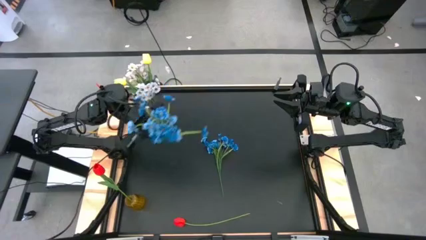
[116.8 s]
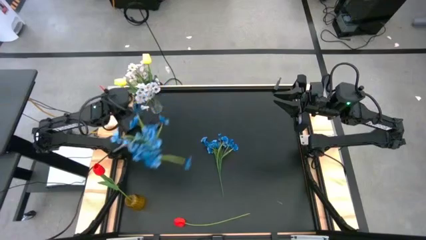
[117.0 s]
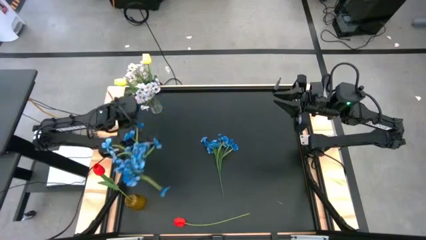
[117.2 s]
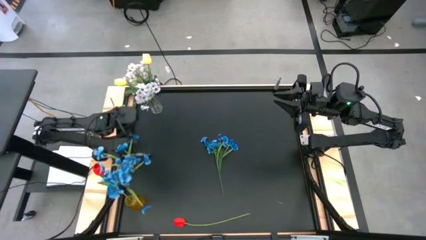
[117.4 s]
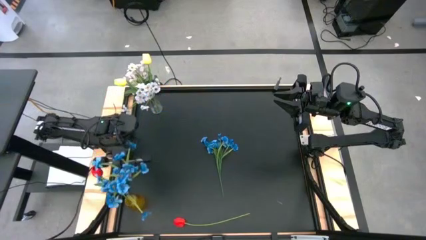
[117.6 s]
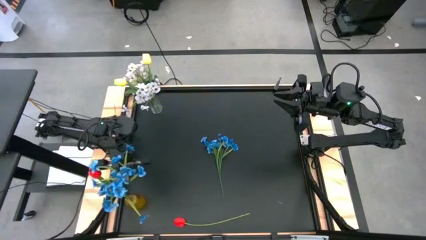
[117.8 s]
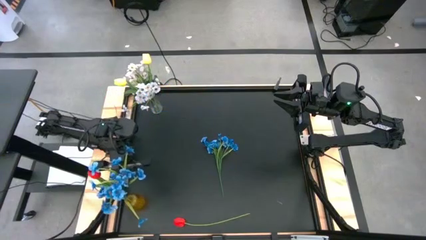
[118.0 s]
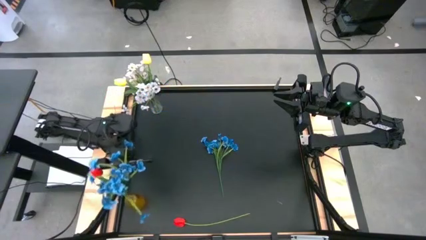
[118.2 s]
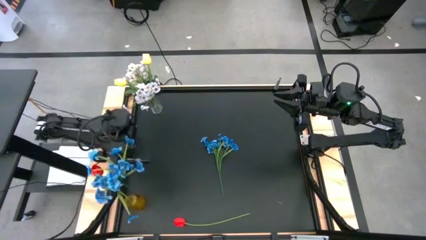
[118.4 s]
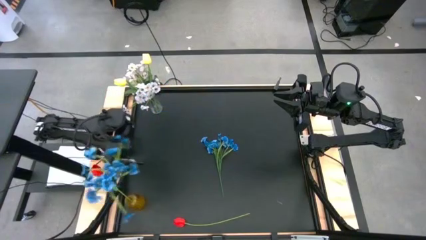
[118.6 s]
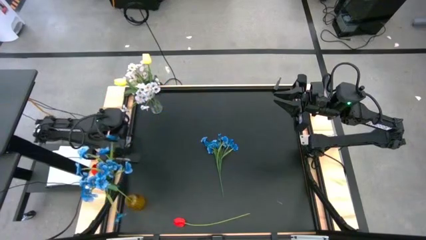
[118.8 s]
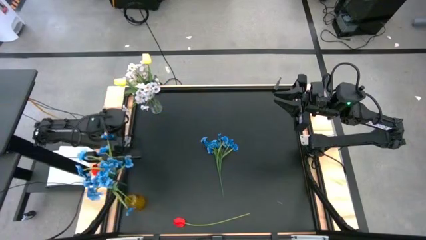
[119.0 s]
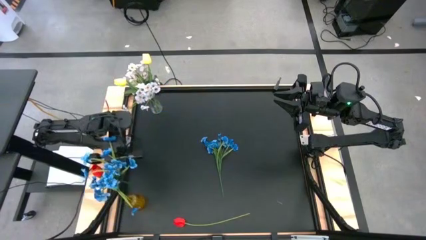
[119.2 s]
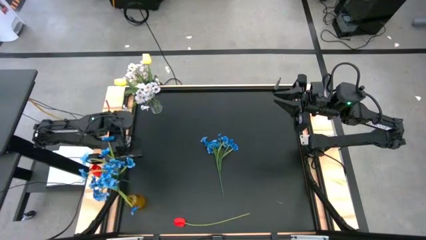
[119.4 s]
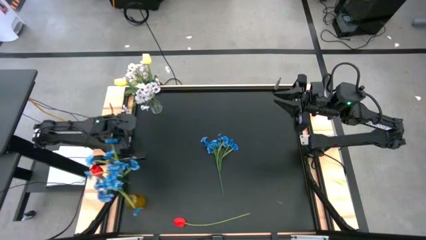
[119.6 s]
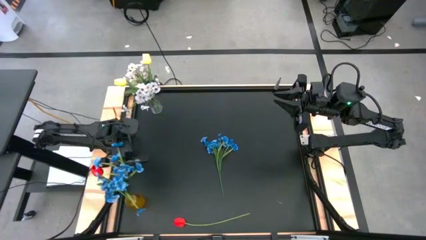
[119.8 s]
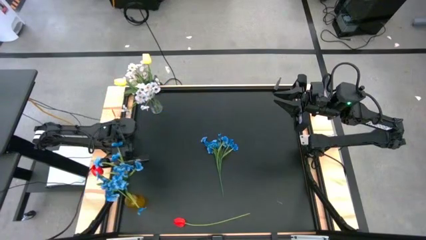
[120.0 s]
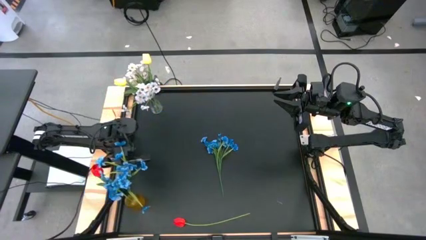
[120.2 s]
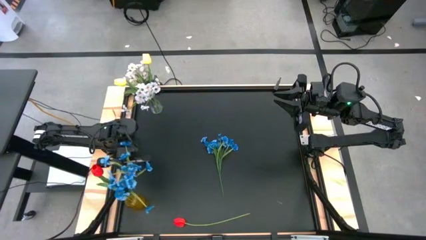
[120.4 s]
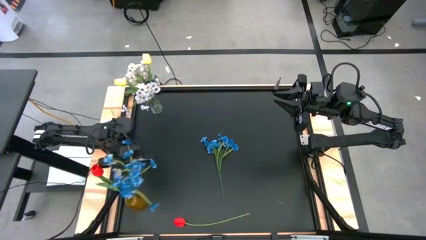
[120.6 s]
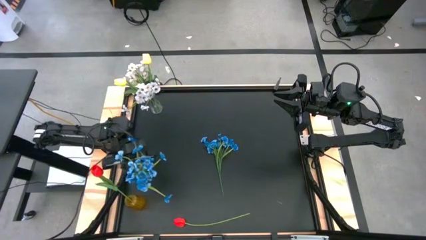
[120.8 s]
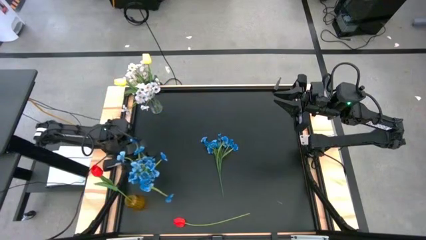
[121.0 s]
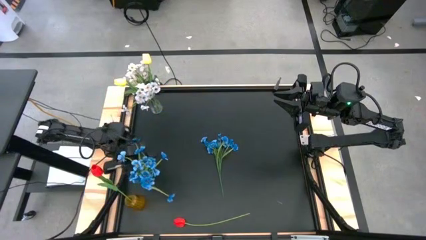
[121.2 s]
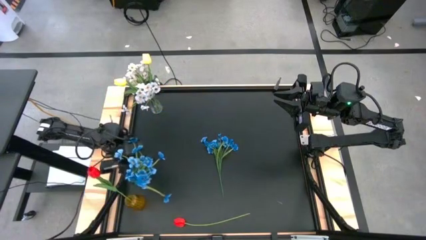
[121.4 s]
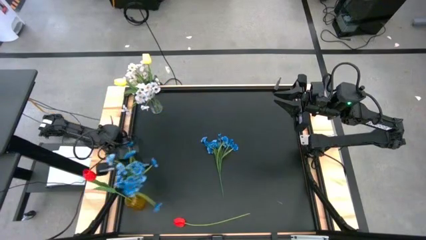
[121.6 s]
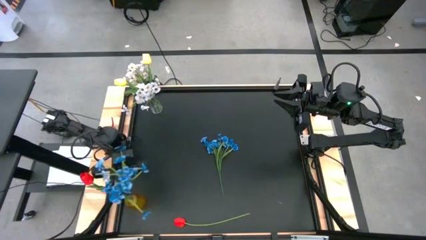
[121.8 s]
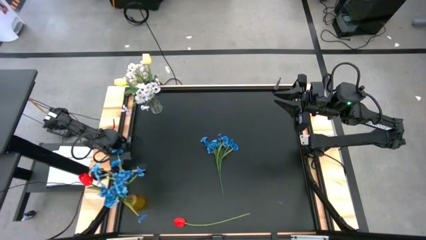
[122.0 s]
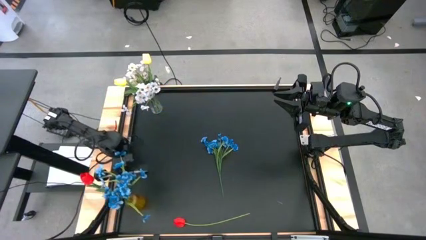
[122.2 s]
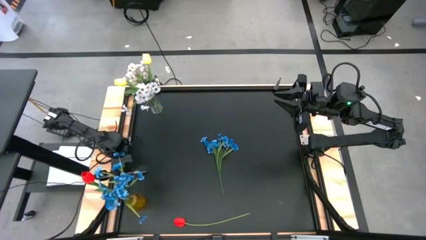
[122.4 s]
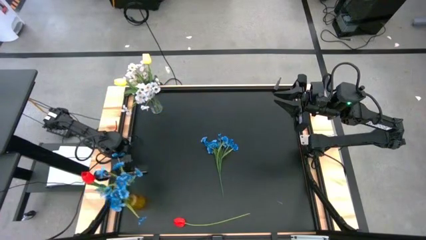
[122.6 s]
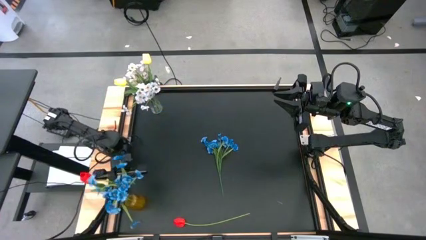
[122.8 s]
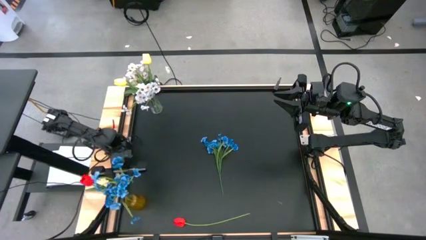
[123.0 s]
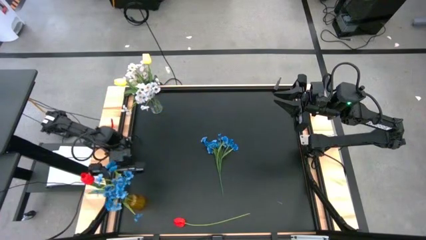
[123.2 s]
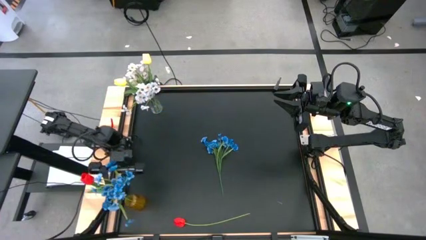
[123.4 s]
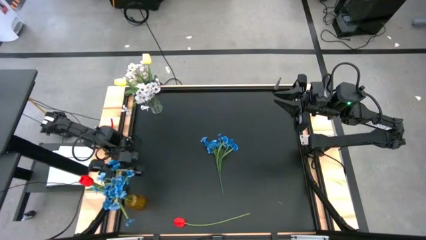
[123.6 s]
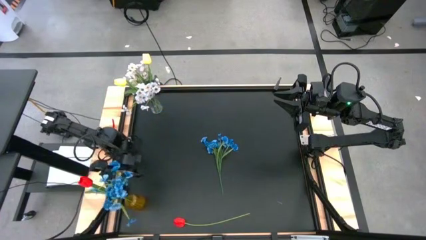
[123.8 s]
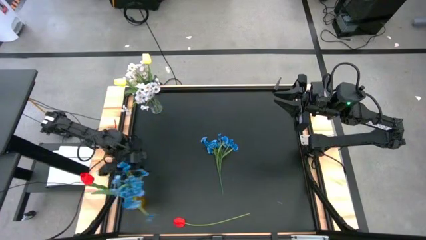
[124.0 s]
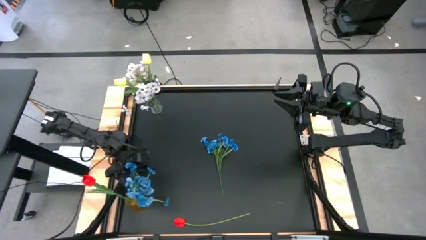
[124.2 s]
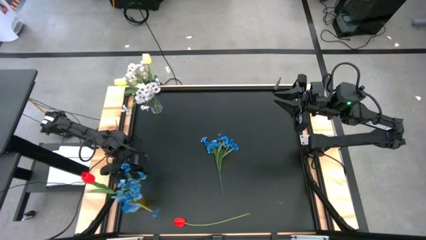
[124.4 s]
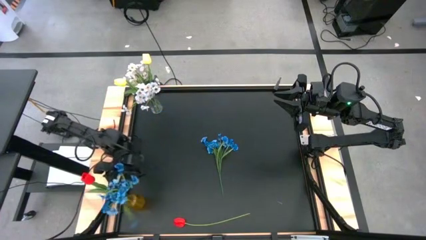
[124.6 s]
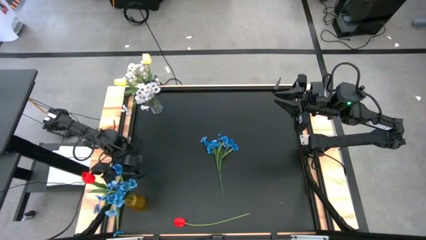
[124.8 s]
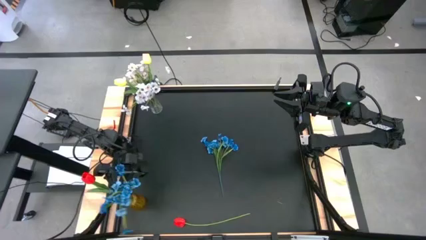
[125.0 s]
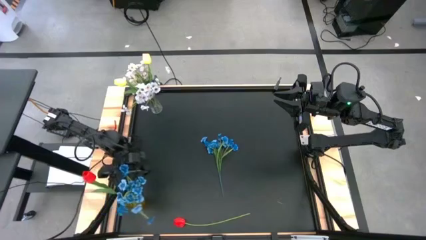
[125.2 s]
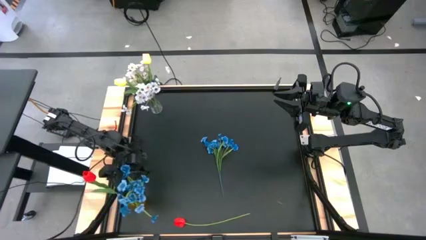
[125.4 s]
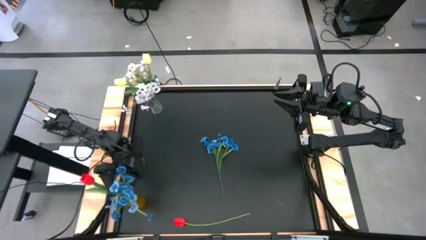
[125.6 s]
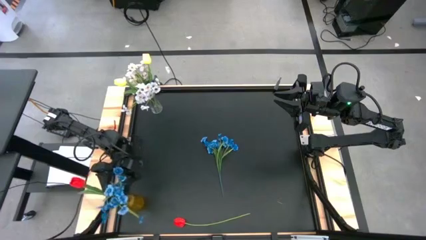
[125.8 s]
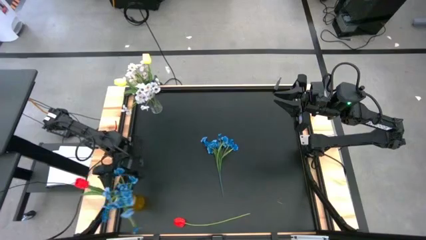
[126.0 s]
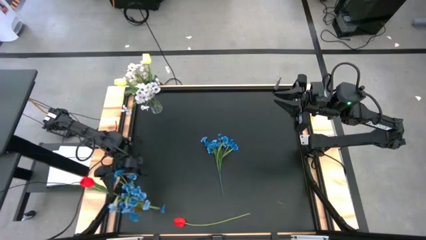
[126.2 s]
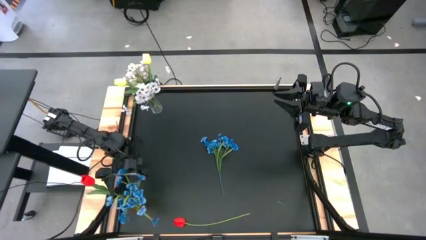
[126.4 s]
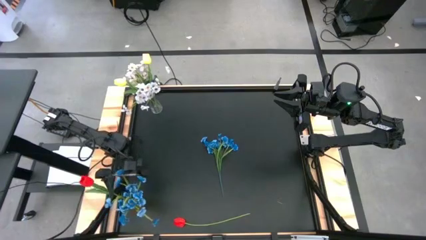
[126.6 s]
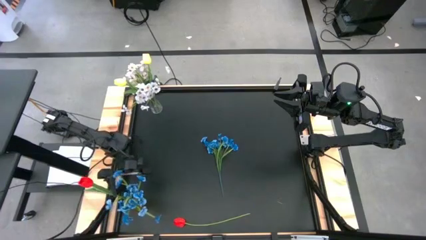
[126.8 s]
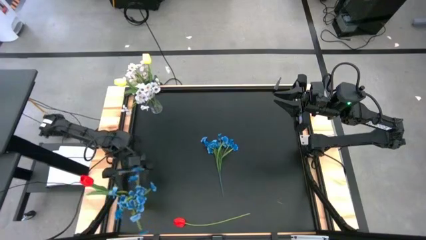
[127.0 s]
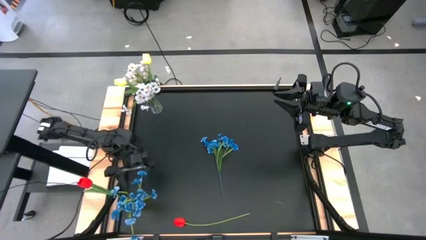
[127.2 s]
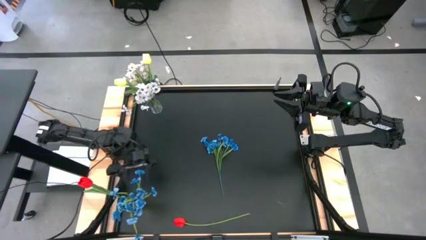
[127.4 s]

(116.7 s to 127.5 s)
Task: Sort flowers into vase by color
Put the top blue flowers into the yellow vase

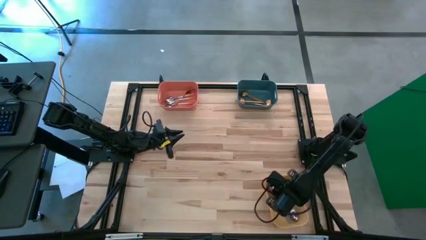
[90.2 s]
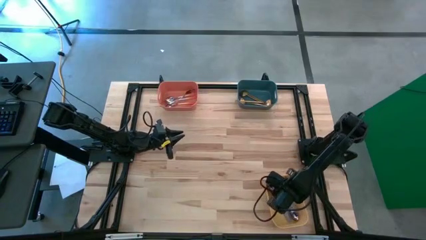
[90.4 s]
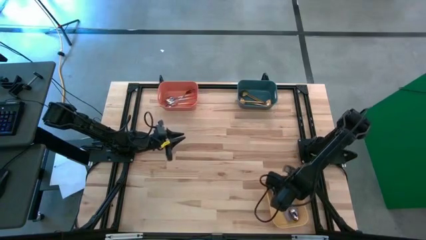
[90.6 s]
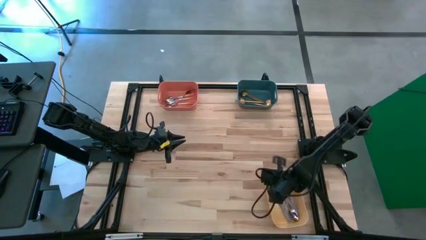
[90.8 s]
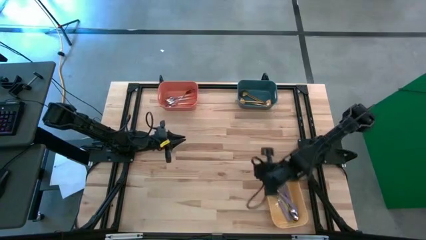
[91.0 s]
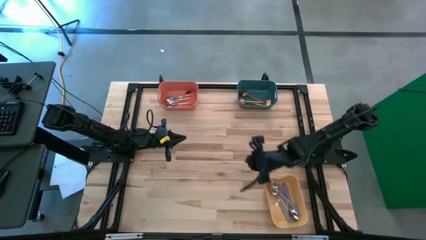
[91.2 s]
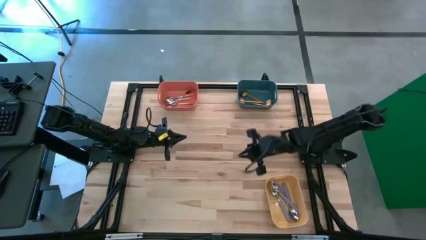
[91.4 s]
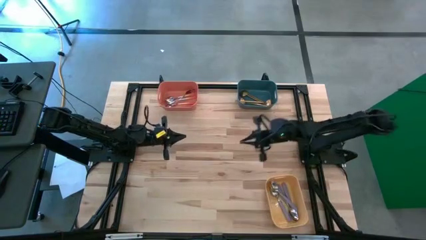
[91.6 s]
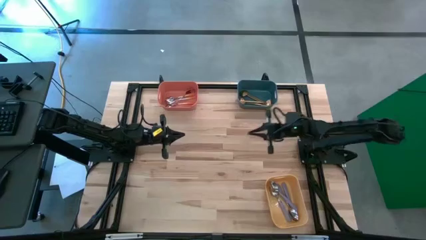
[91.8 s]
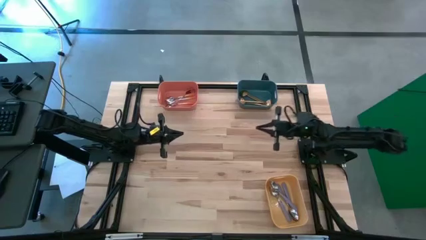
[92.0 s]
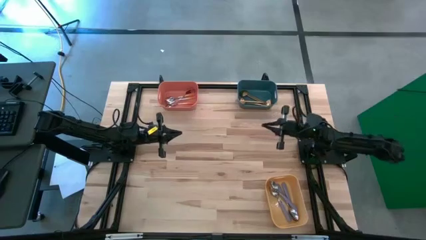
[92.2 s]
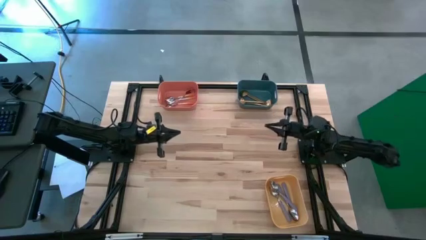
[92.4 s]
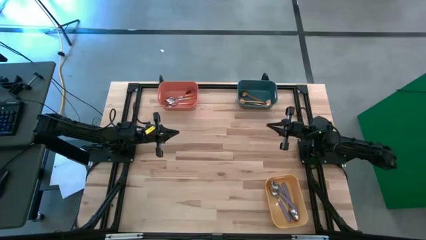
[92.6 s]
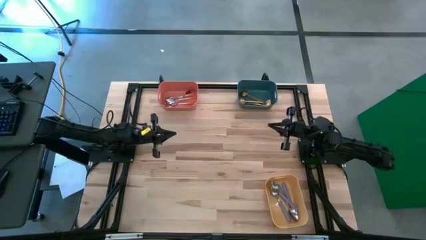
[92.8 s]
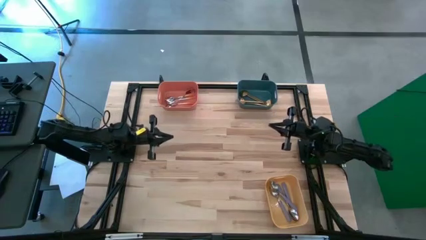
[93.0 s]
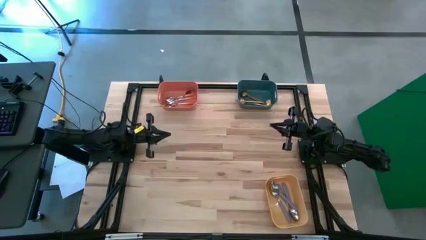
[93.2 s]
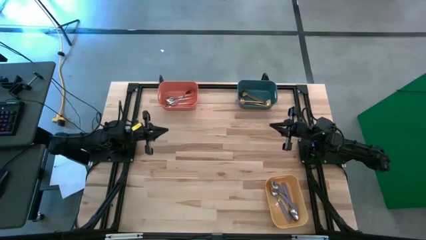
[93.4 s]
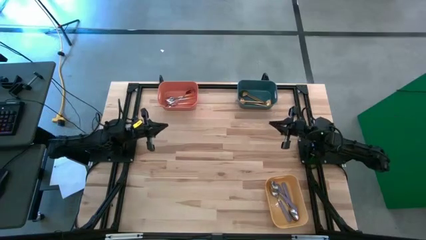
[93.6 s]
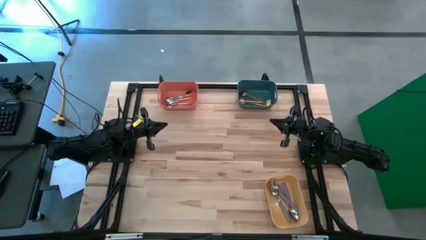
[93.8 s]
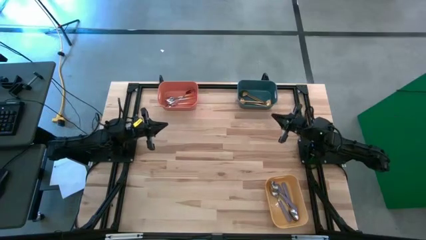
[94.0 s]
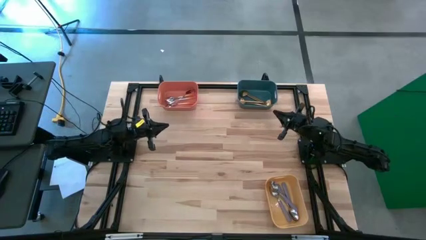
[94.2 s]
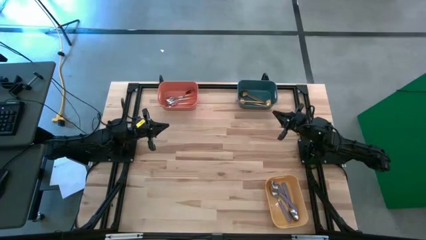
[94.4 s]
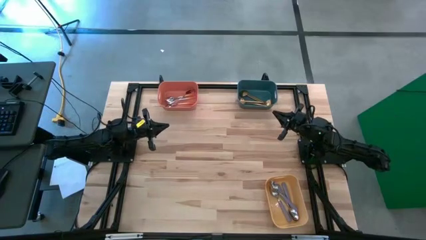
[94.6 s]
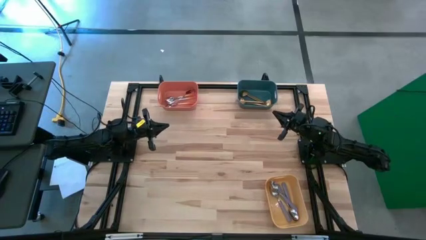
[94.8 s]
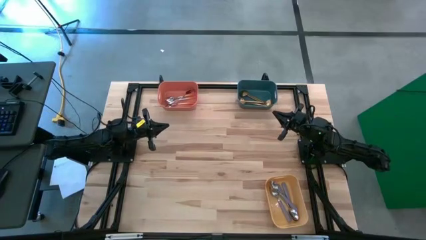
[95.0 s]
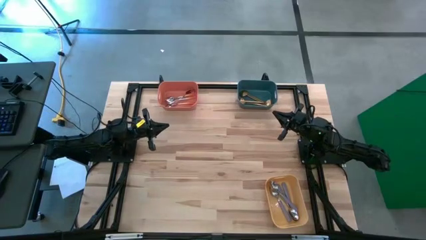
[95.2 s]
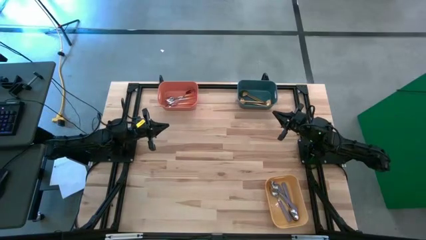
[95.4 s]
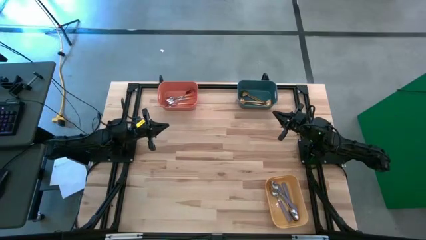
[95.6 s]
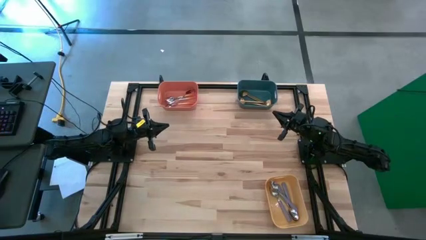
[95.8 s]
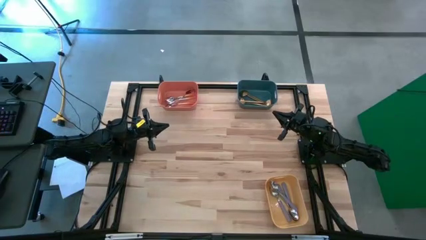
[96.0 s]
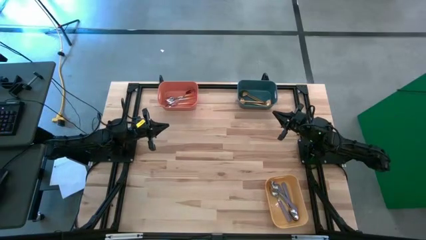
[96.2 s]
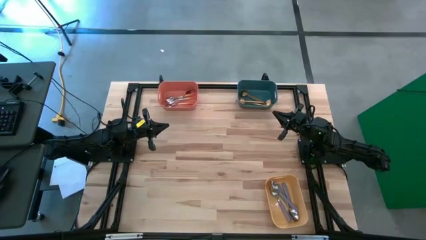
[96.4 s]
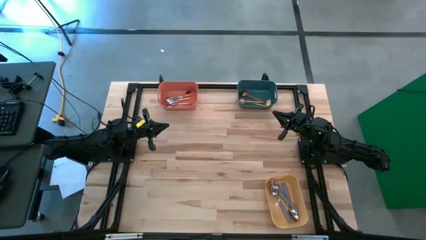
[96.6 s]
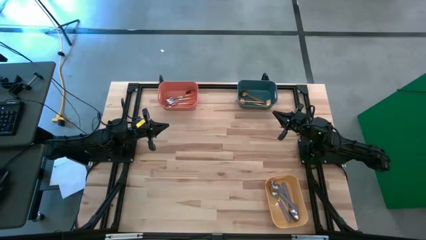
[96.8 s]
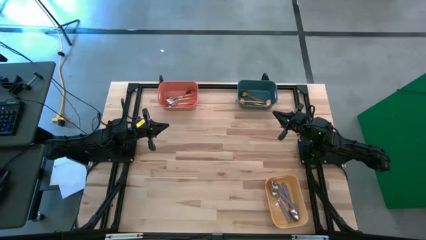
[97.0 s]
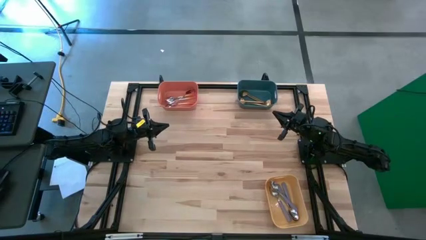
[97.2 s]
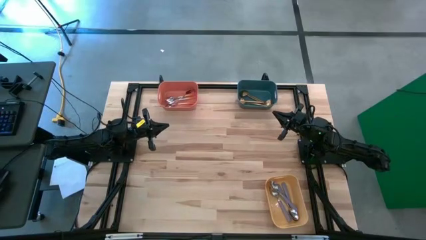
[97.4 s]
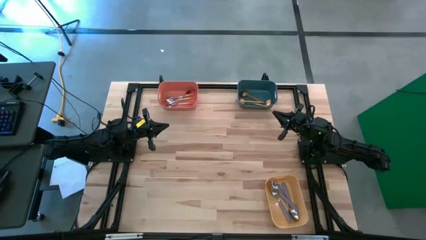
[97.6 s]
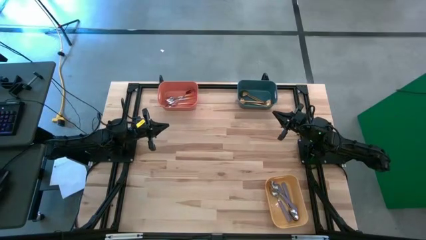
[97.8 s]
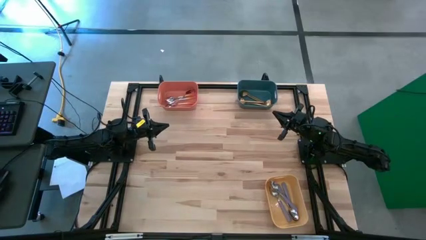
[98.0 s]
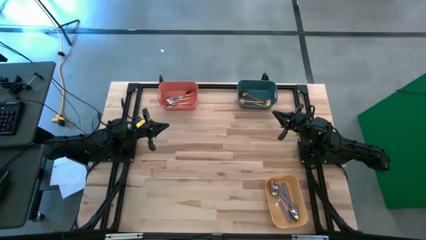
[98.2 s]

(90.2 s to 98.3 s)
Task: Sort silverware by color (type)
Return to Home Position
